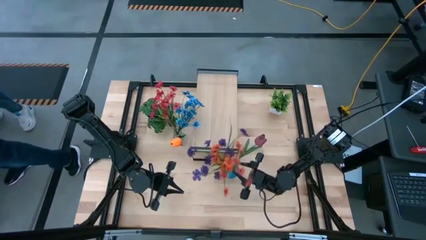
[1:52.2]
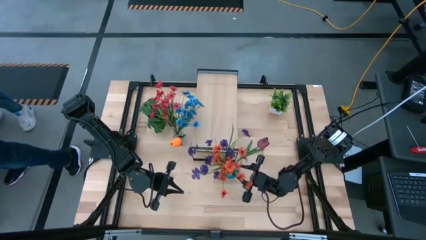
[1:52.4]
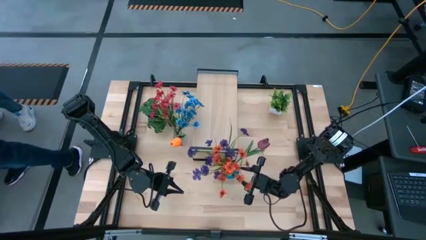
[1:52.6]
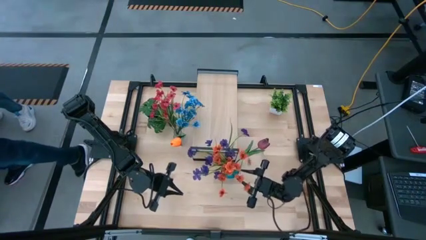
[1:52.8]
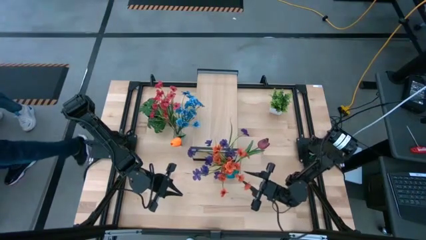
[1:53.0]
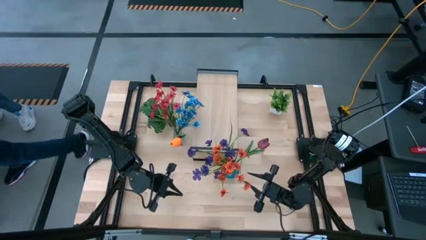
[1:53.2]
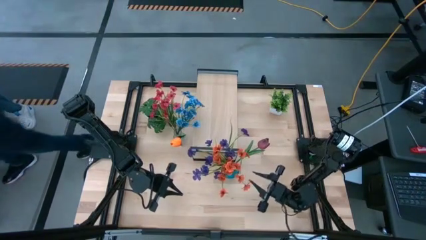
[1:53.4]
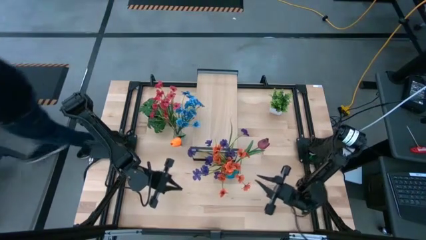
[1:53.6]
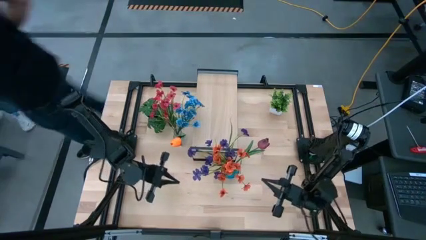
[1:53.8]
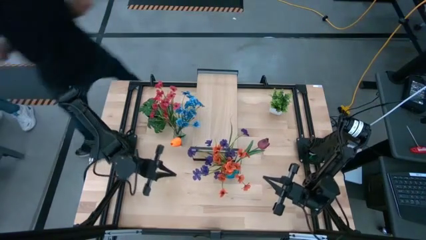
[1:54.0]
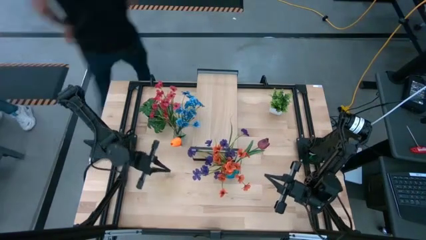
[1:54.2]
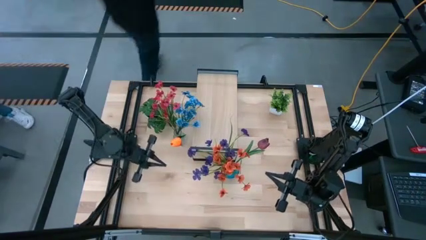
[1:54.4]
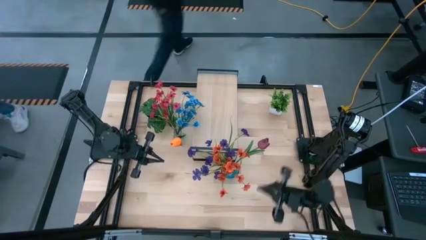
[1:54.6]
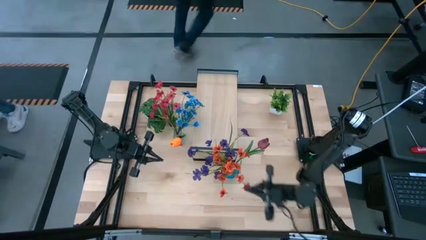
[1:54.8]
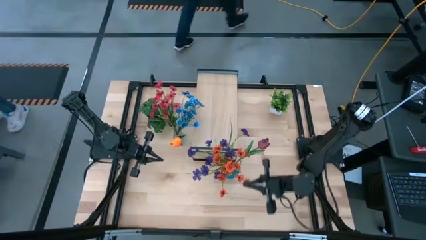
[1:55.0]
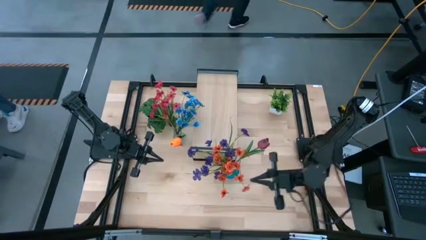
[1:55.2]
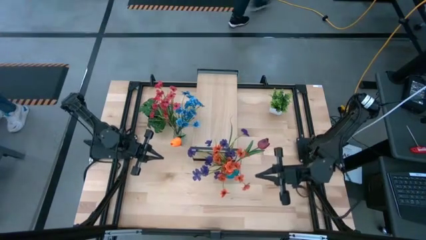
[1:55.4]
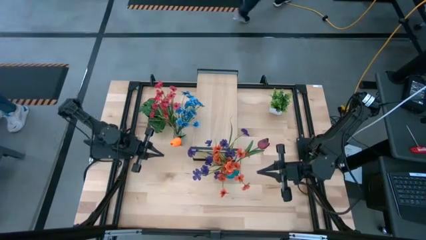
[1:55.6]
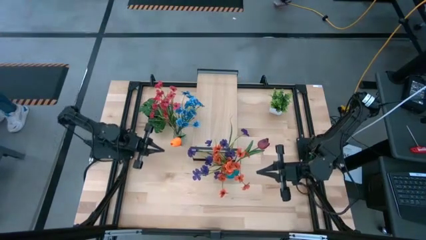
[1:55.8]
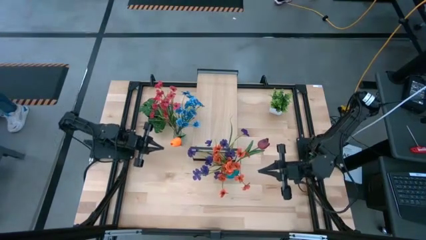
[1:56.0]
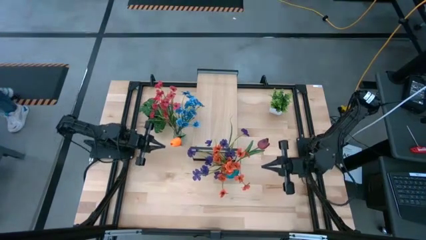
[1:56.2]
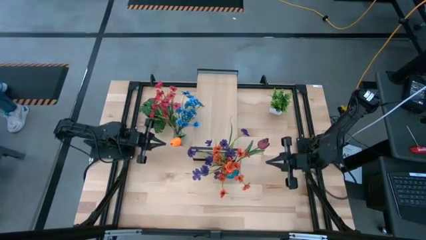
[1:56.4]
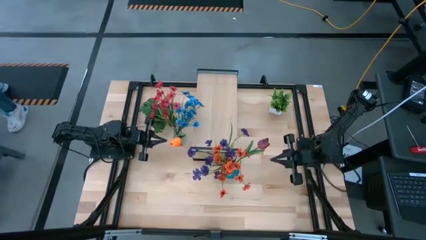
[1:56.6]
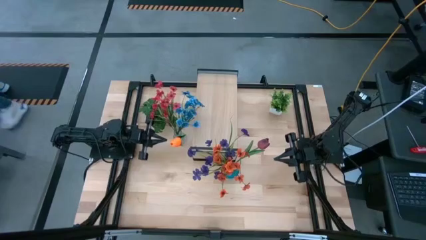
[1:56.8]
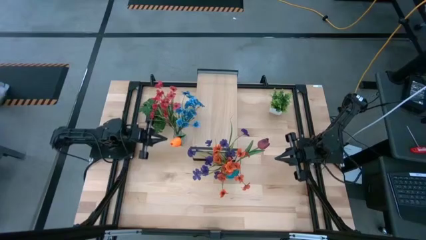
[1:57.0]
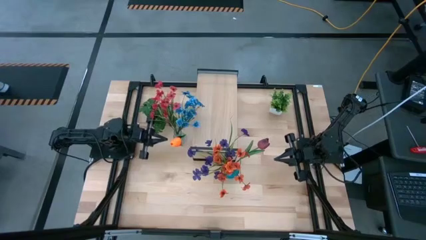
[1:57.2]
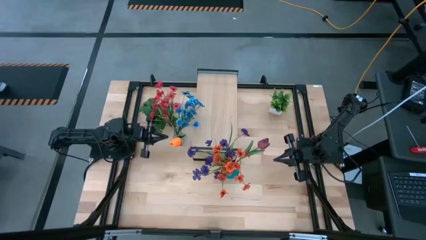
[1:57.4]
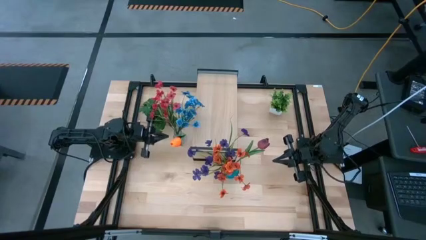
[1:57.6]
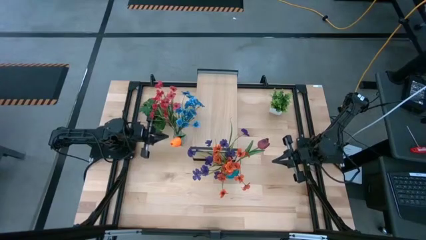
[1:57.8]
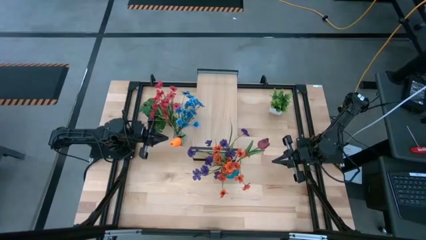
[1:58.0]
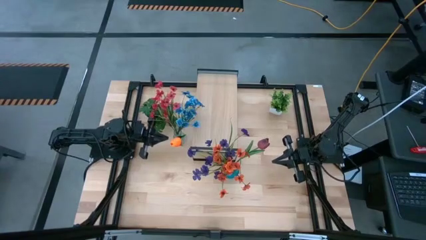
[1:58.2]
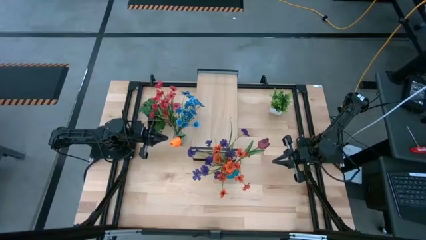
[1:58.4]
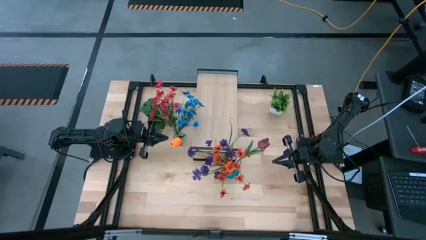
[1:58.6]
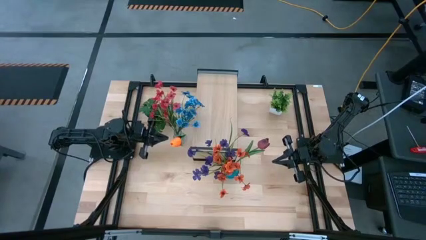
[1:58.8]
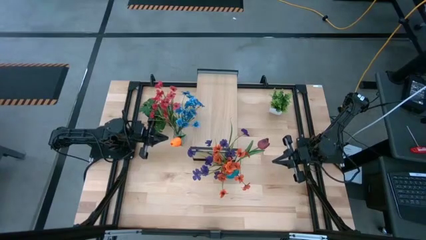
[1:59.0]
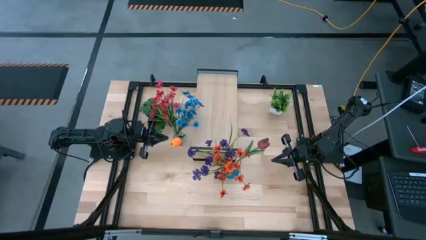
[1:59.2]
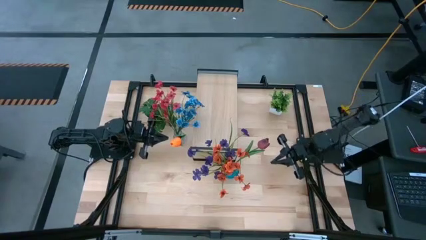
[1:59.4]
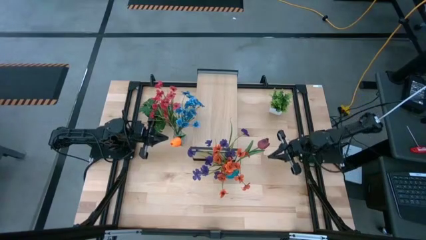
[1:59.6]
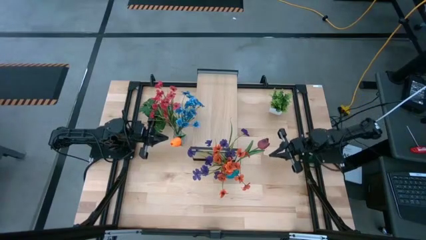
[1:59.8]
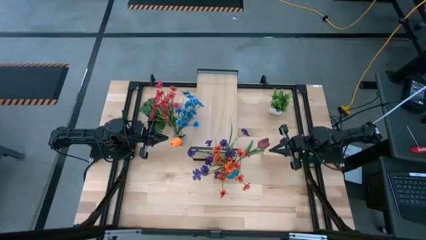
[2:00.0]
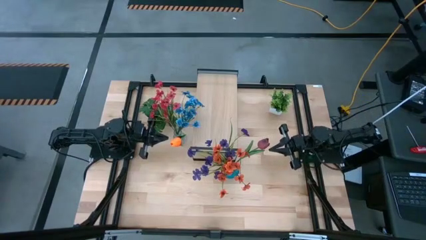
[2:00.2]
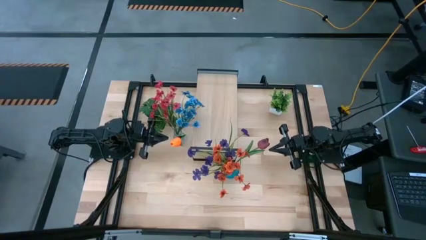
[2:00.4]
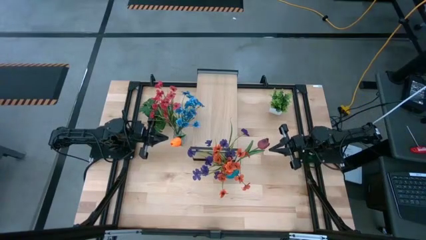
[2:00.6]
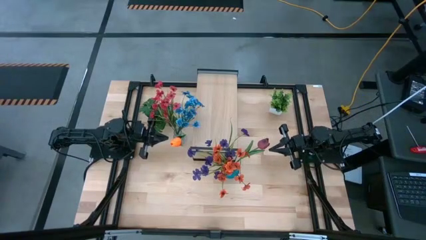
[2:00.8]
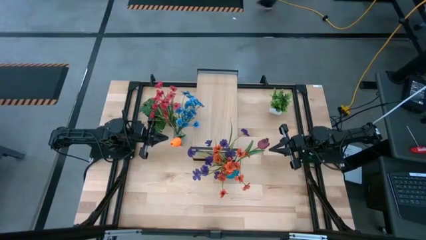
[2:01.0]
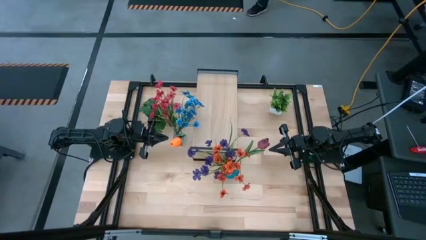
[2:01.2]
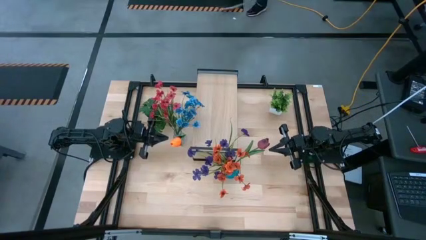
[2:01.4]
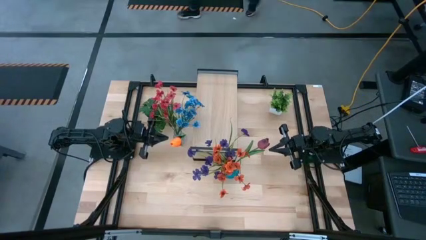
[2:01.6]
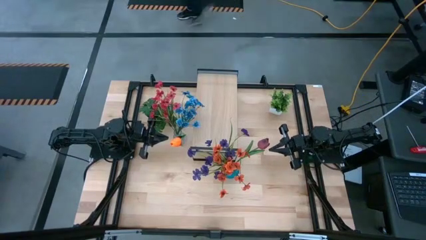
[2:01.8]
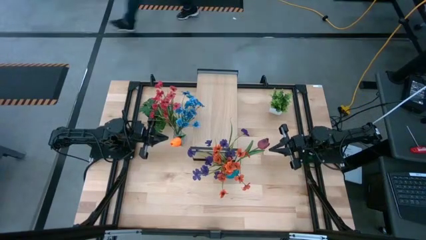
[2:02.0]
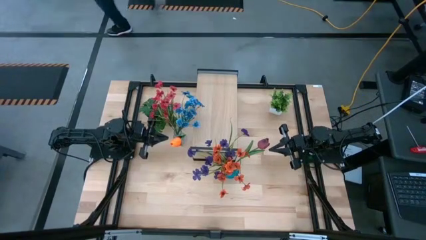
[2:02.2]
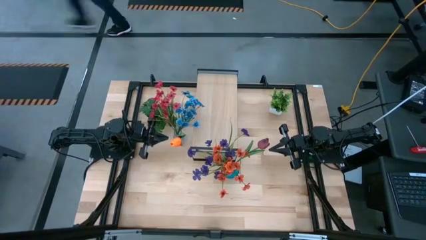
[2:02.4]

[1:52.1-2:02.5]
Task: Pick and place flowers into a vace then onto a shelf
Return to Home Position

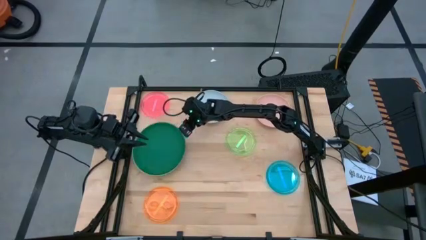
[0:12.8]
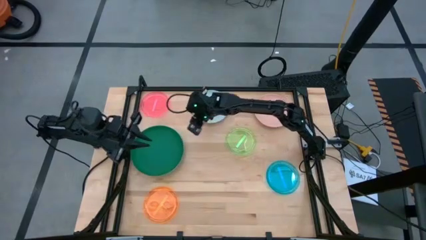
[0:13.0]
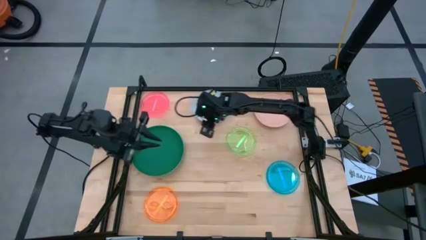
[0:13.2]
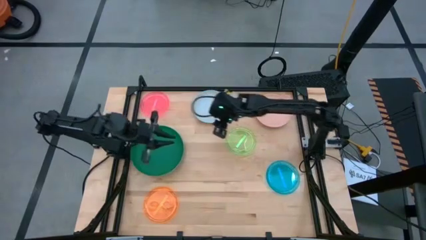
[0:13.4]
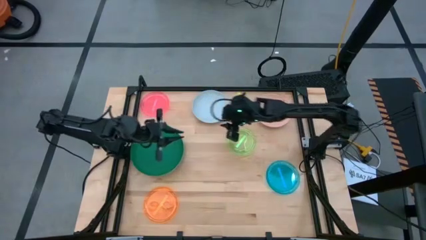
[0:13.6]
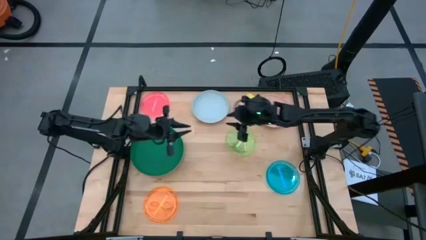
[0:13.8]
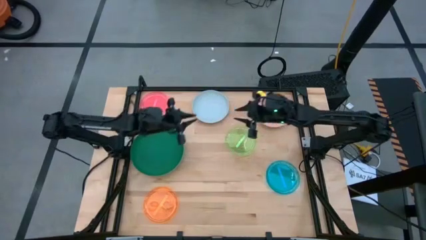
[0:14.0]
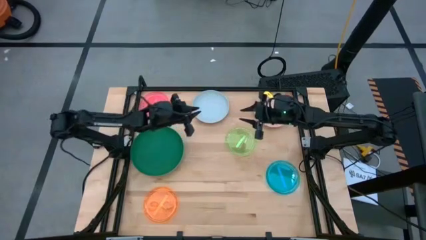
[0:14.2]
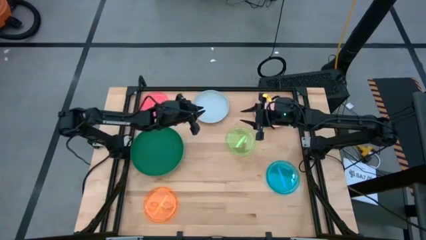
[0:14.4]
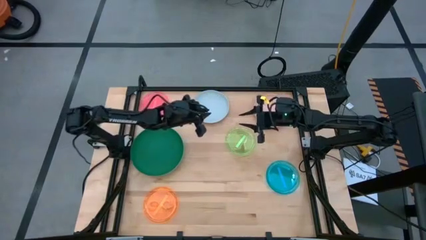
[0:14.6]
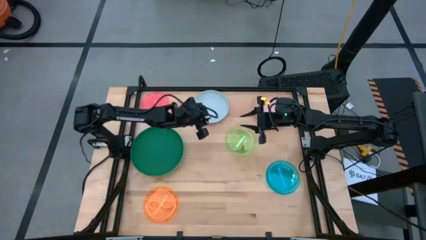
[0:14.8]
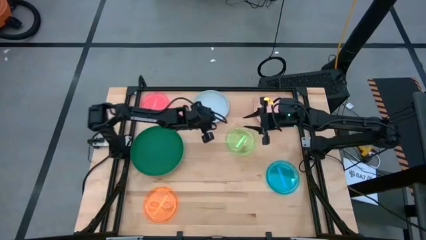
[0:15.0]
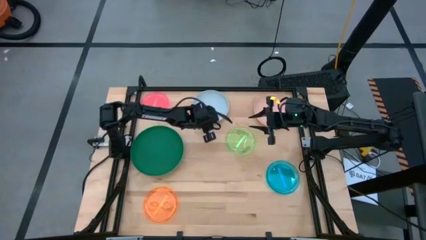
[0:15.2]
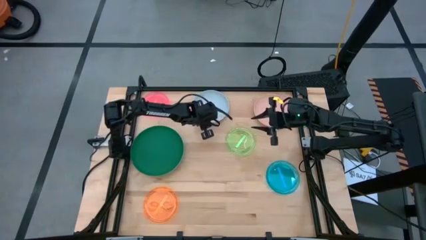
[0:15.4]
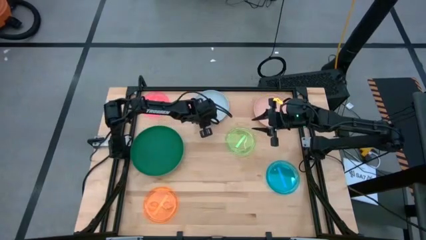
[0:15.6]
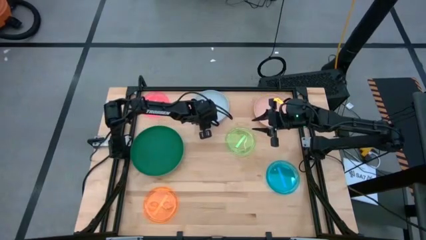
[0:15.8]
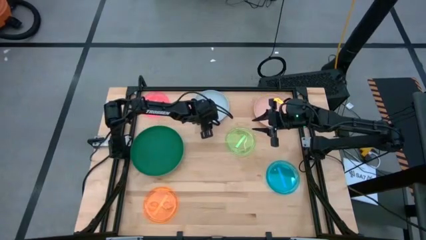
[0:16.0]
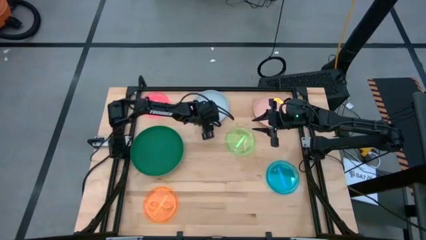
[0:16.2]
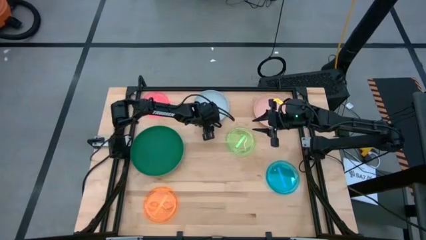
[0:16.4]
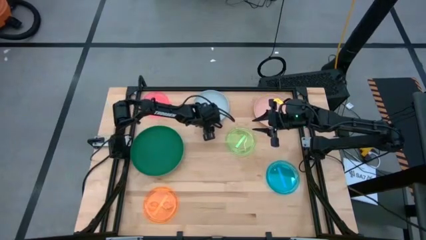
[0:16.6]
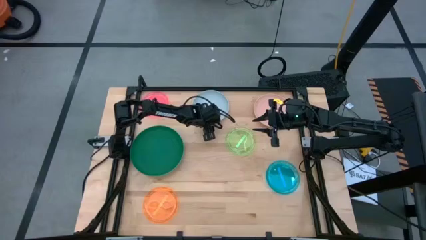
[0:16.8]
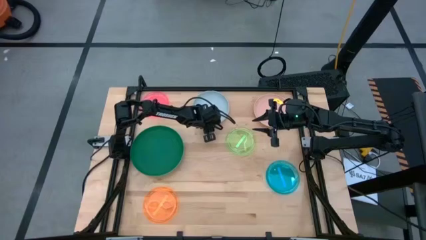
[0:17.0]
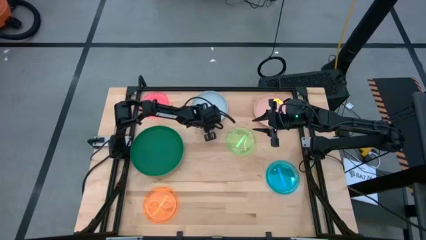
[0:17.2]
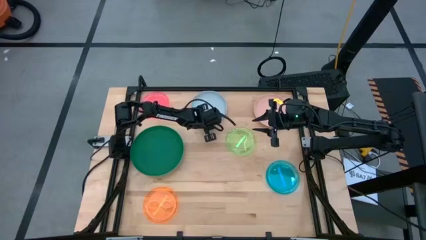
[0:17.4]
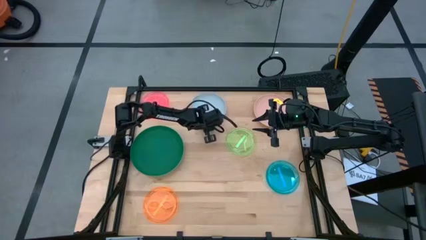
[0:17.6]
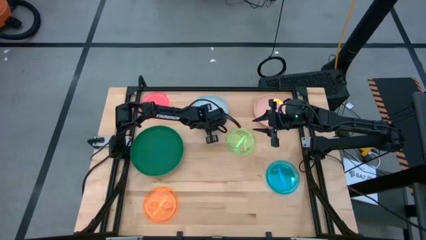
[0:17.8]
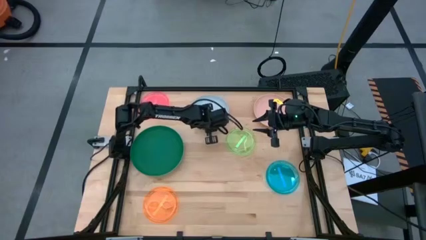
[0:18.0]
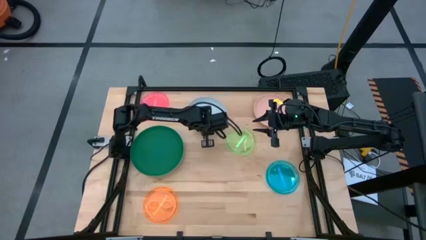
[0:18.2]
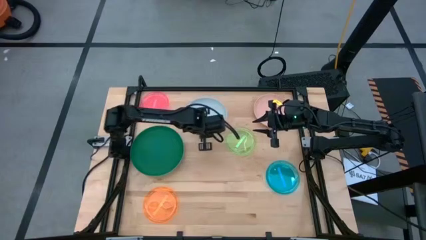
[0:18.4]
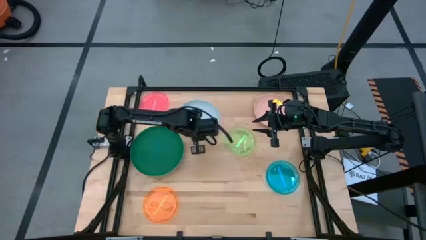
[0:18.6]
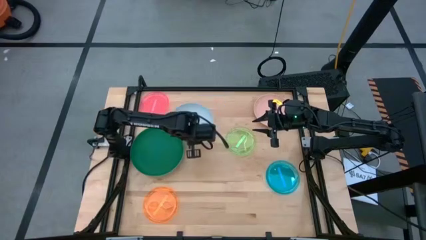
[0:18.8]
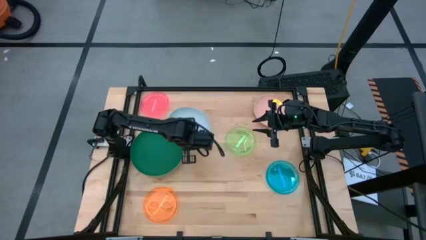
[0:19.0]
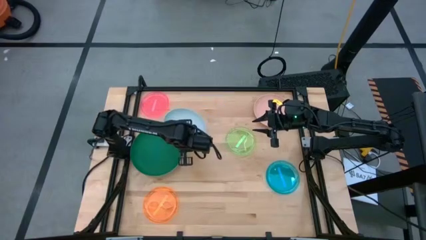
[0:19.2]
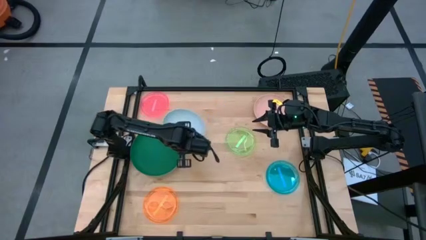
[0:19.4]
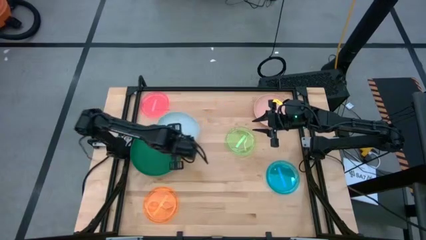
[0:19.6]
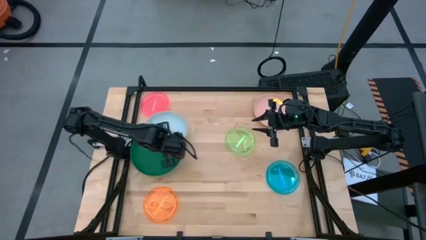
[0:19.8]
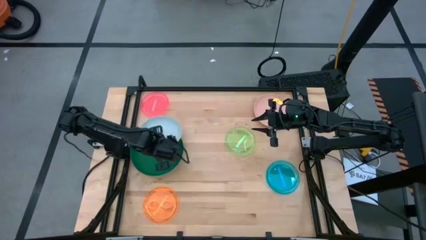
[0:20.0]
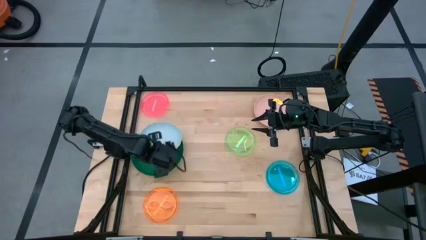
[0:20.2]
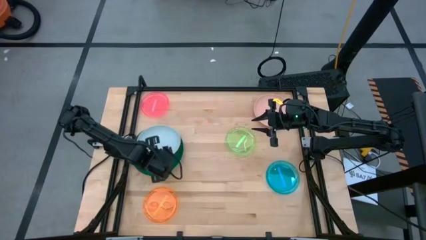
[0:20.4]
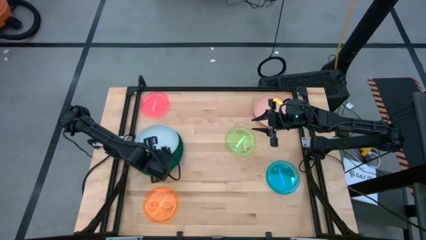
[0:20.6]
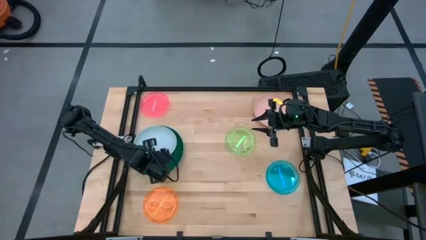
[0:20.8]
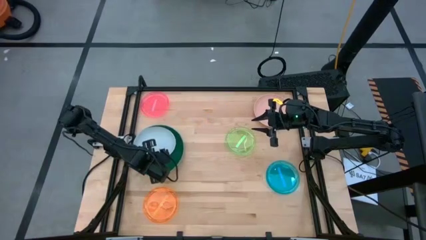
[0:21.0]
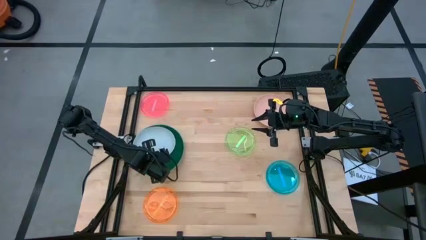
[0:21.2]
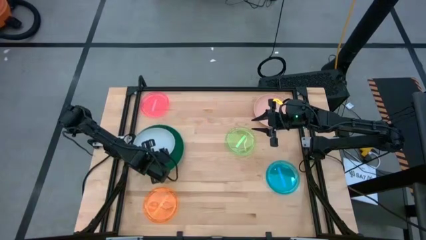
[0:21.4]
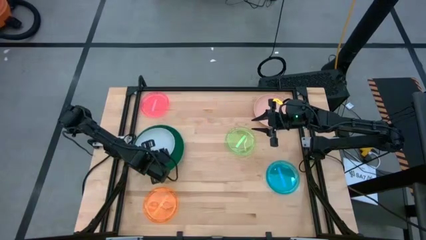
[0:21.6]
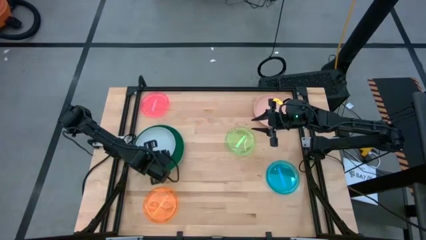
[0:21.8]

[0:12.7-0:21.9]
Task: Stack plastic plates
Stack the light blue plate on top of the dark green plate
